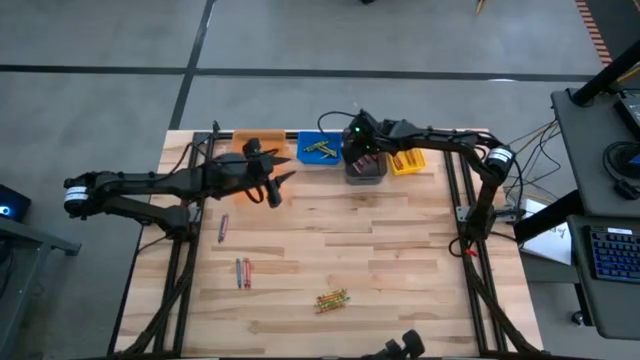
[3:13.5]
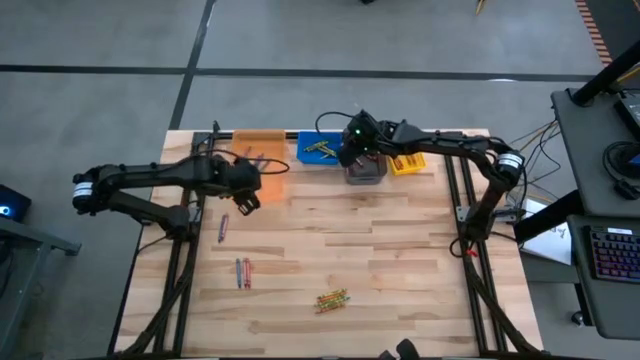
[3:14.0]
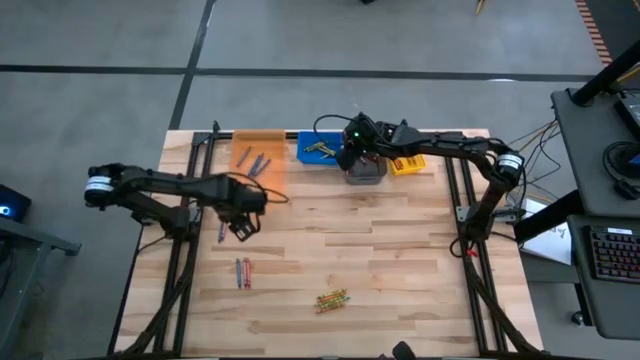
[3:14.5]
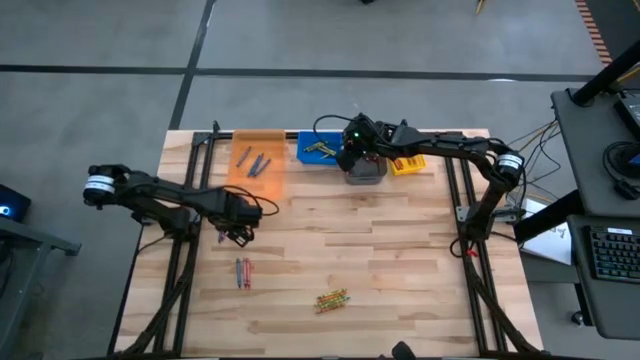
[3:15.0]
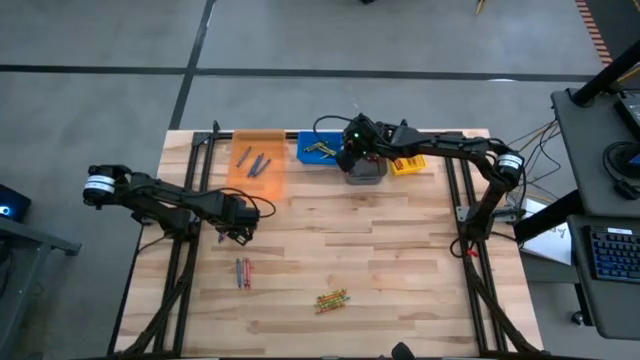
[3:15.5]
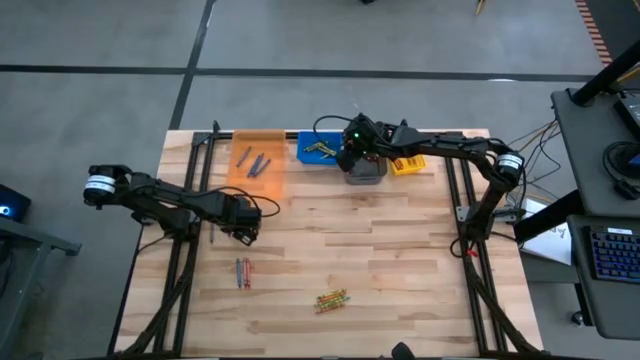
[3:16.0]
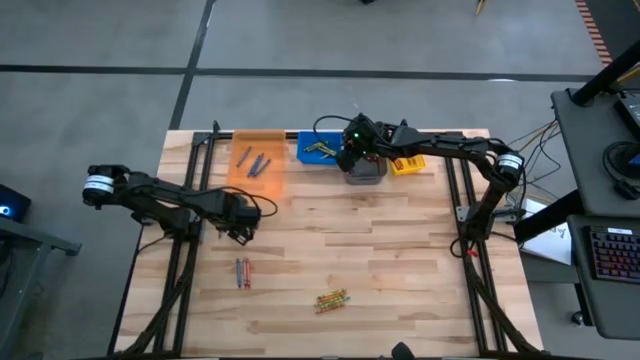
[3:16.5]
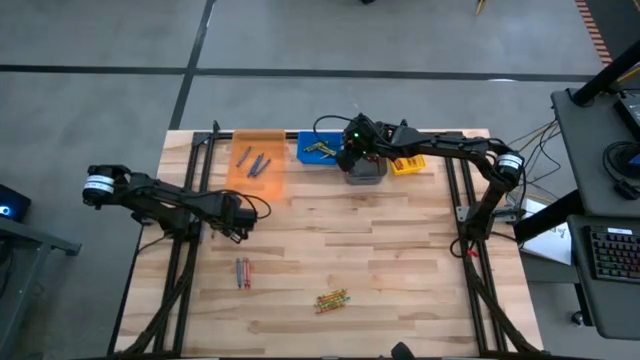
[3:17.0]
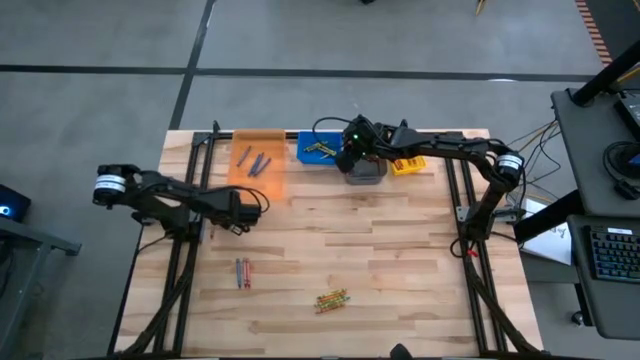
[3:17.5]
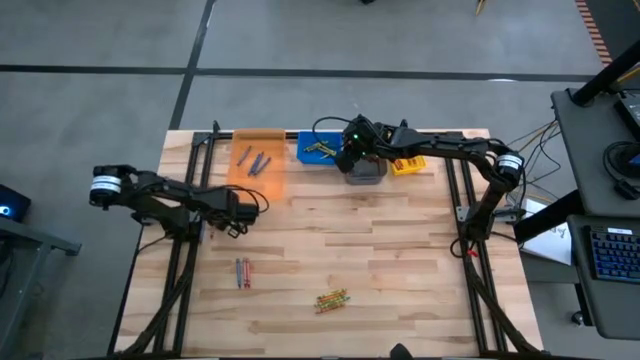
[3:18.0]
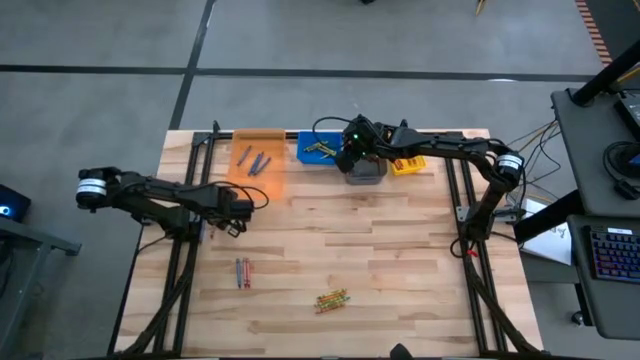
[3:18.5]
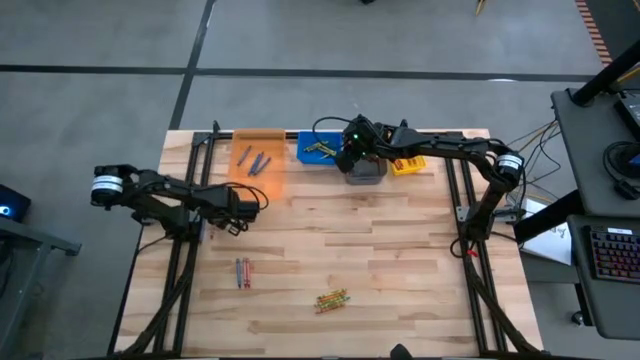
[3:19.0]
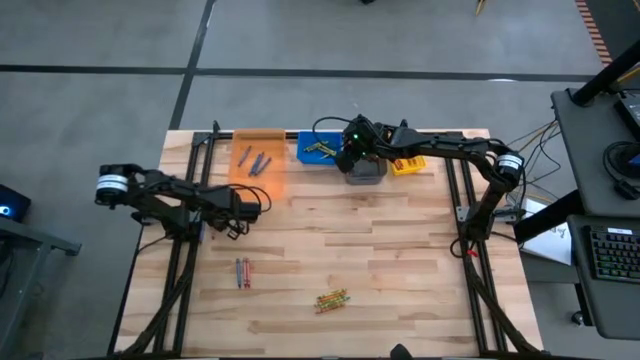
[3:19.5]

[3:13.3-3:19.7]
Task: Sort crayons
Put the red crayon into the black bin

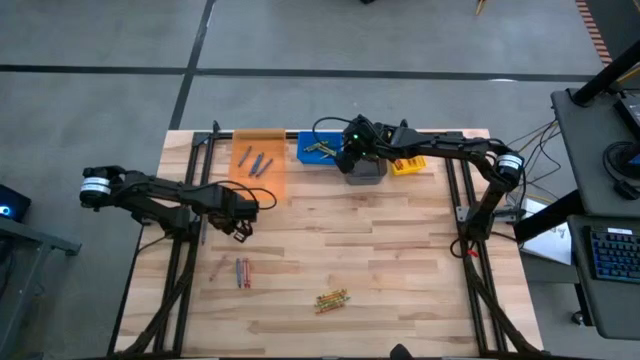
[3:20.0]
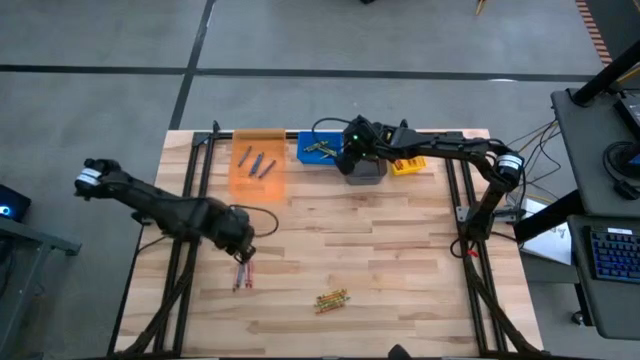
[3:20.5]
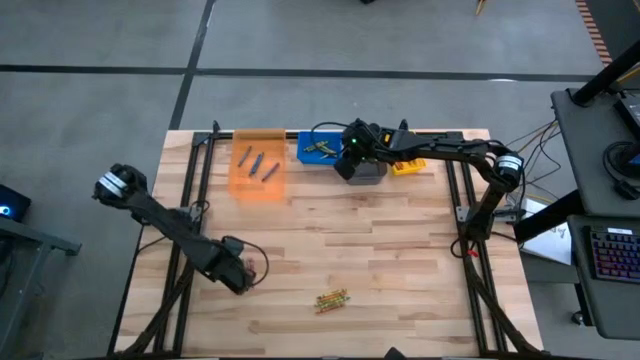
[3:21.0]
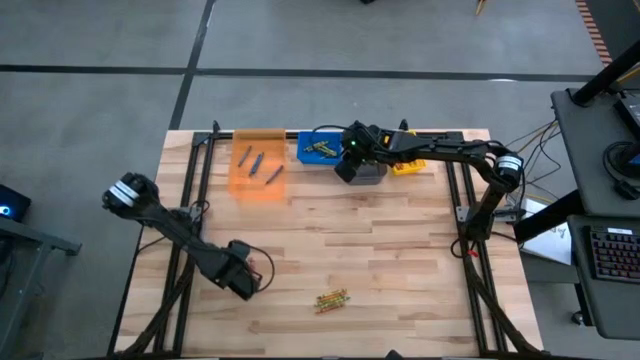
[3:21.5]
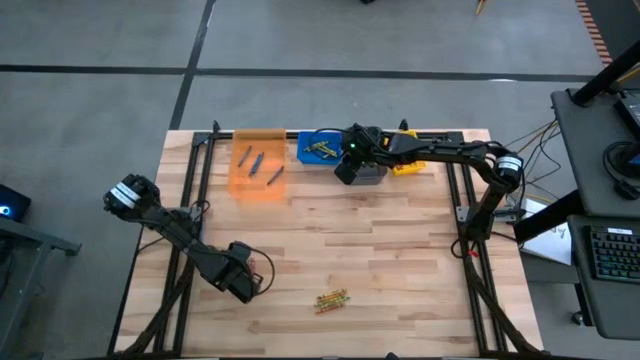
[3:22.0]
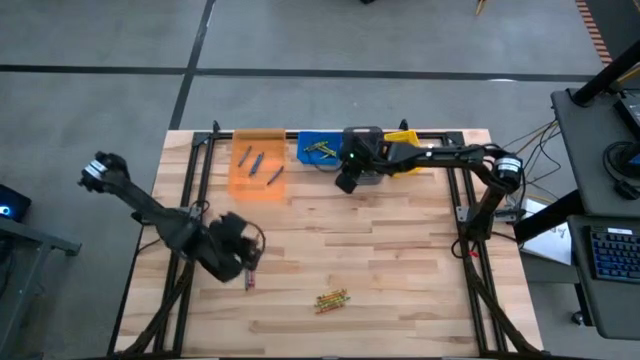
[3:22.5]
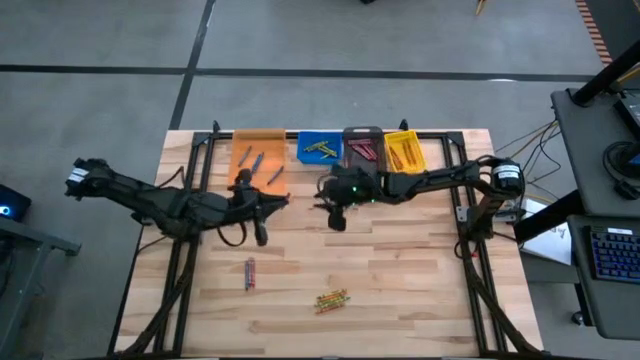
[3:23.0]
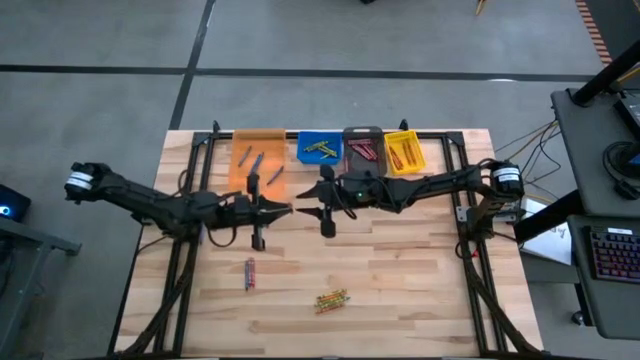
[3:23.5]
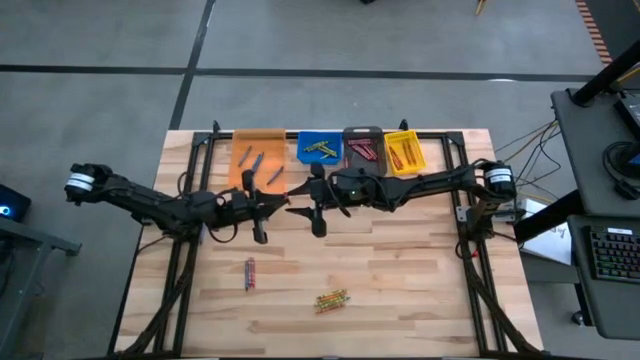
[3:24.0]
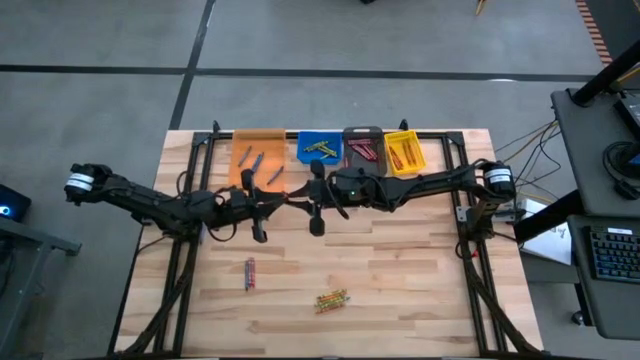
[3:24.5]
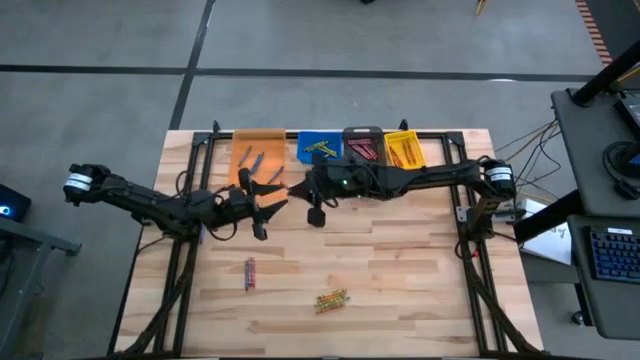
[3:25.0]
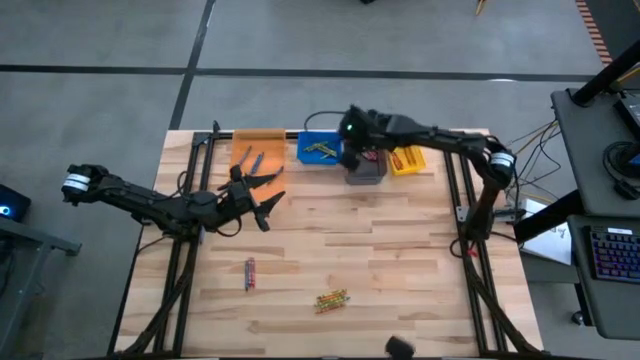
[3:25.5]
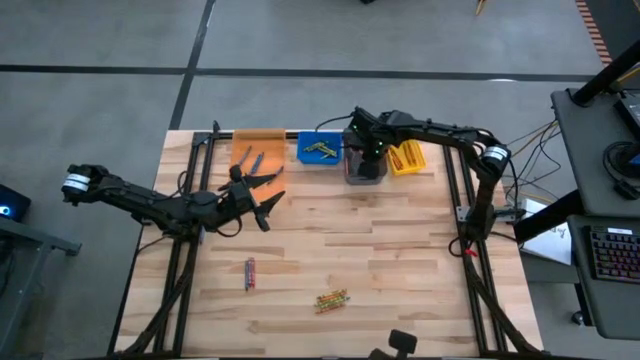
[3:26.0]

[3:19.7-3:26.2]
Put the red crayon into the black bin

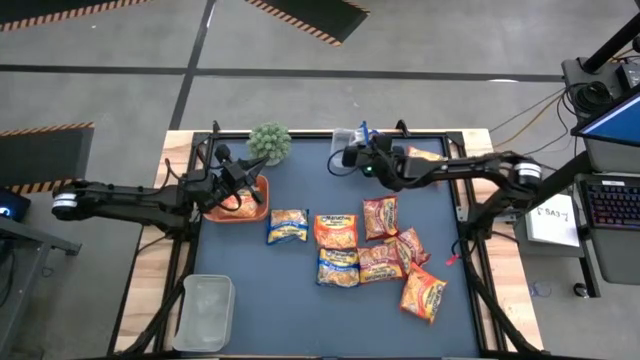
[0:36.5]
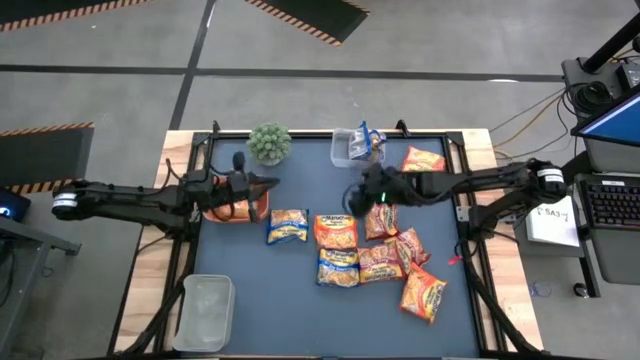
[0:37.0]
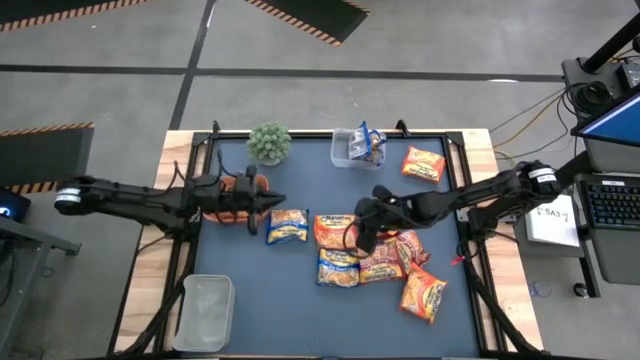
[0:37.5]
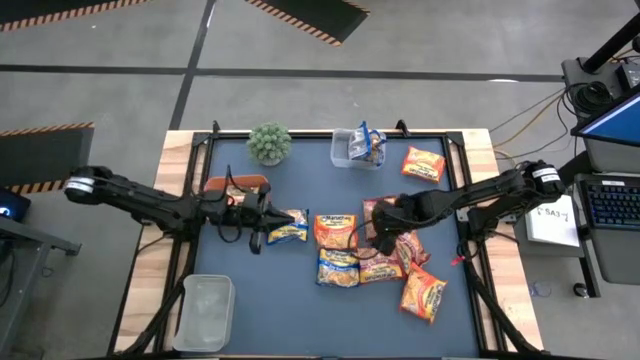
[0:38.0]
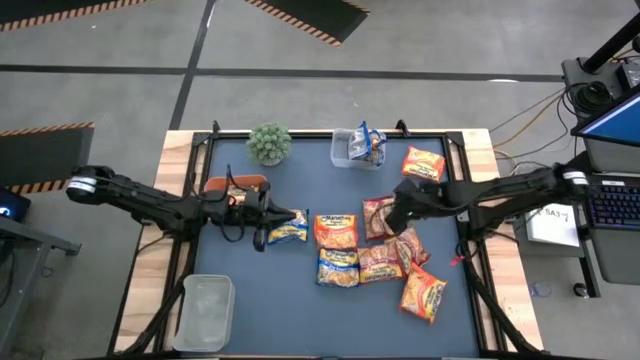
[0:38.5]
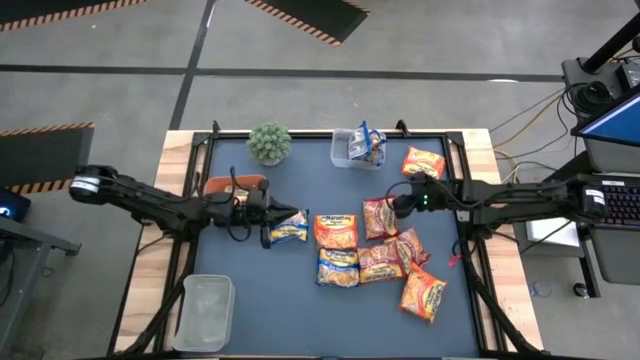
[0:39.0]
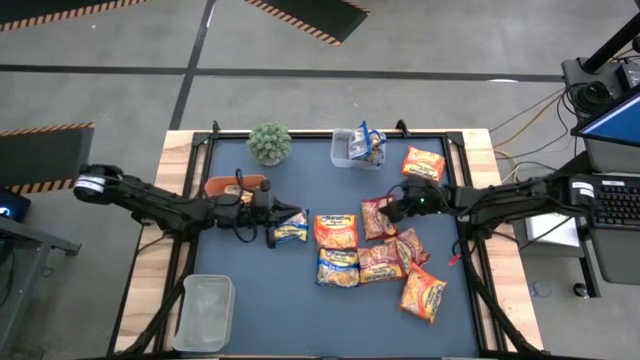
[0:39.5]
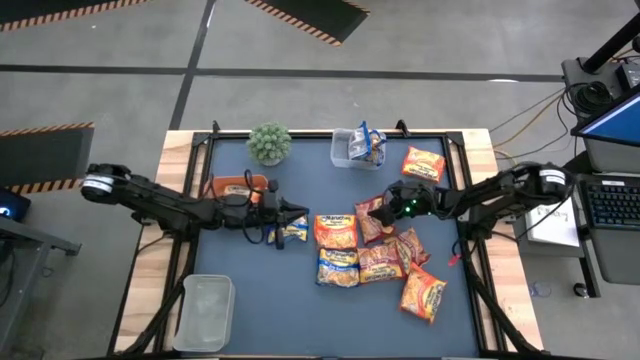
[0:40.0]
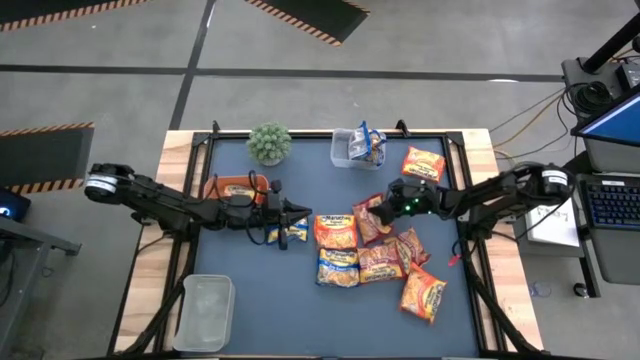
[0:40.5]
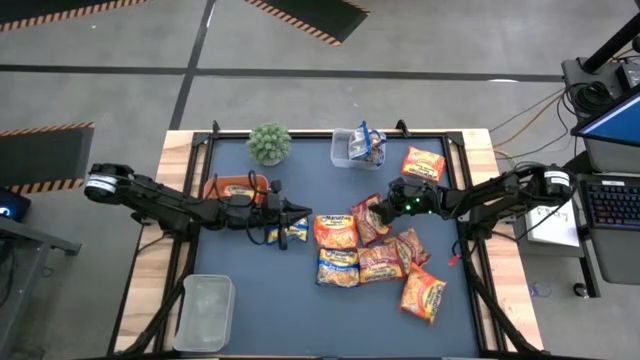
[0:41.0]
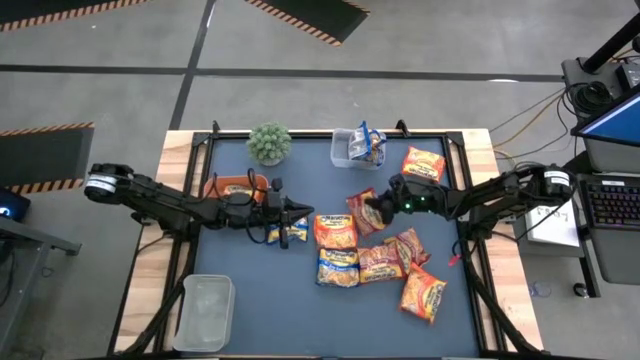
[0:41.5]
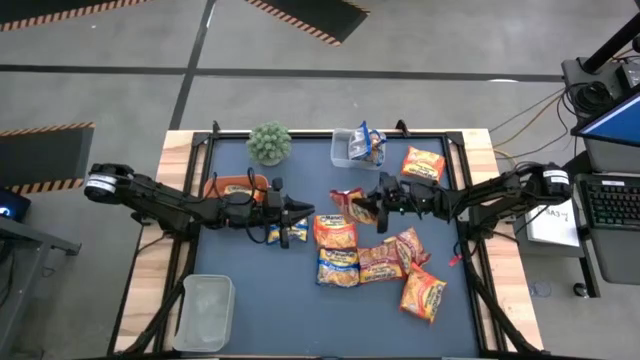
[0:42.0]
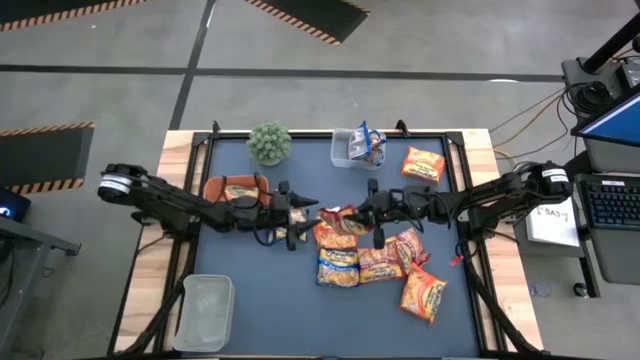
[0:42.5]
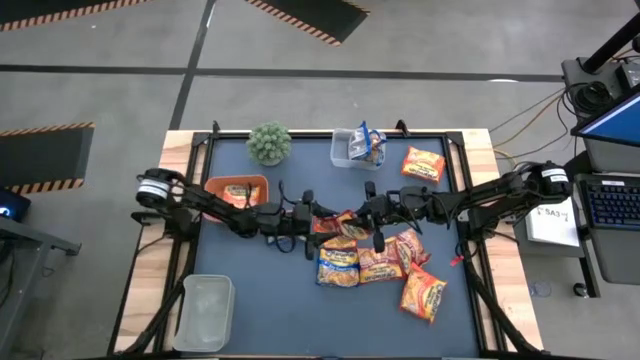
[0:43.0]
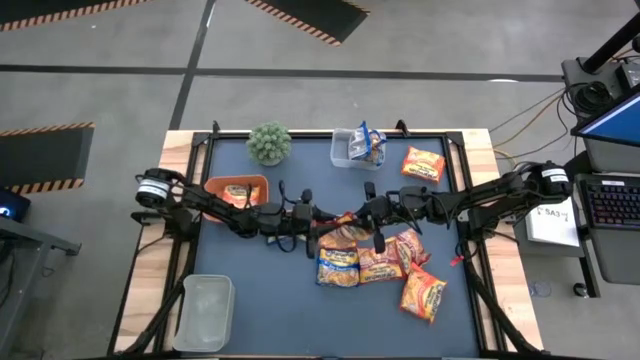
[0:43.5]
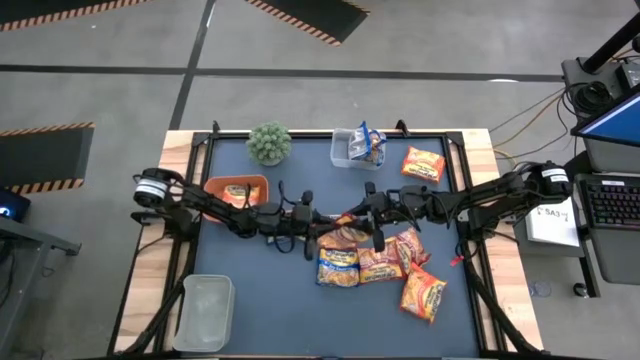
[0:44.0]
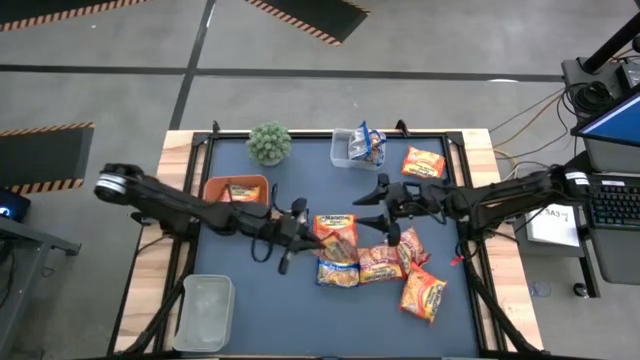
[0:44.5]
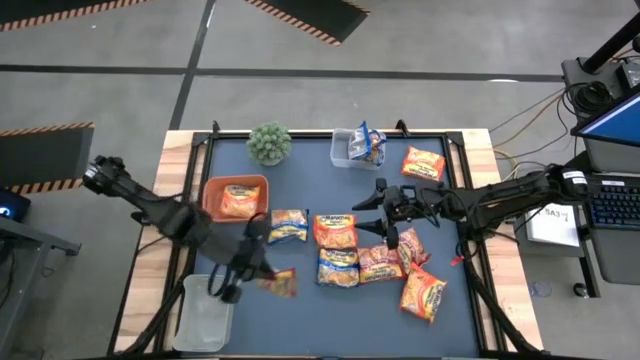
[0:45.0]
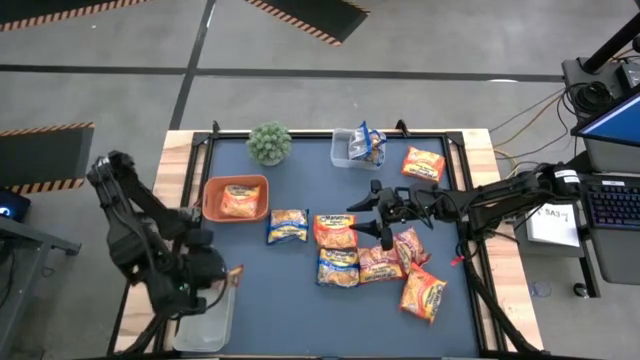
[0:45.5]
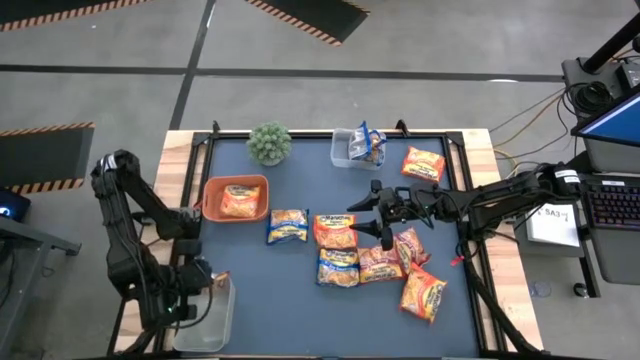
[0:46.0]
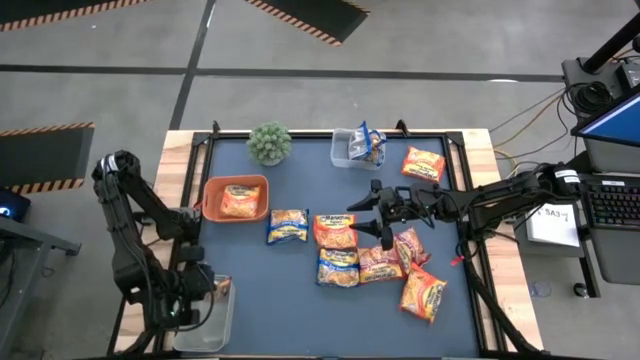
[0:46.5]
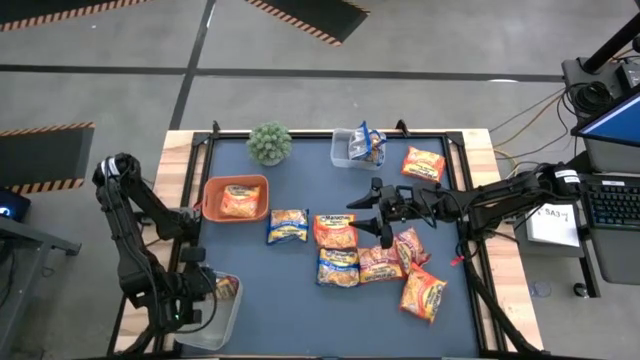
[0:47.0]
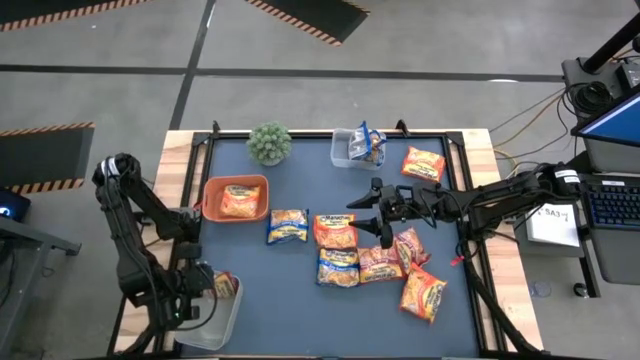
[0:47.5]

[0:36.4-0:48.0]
Task: Sort Maruchan noodles
Put the red noodle pack into the gray bin
